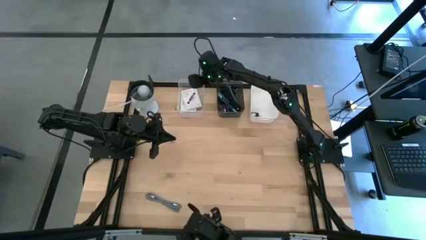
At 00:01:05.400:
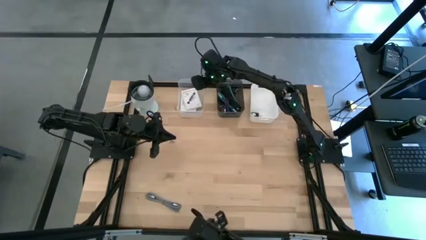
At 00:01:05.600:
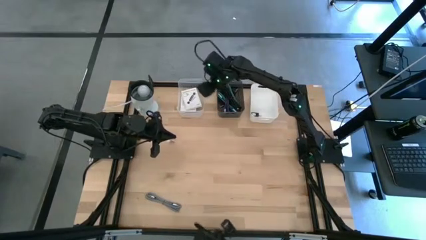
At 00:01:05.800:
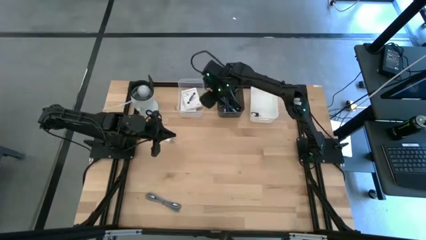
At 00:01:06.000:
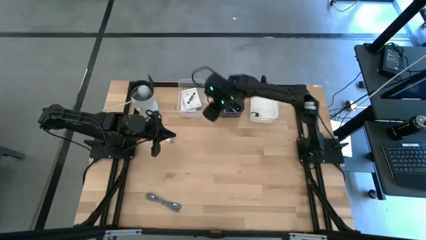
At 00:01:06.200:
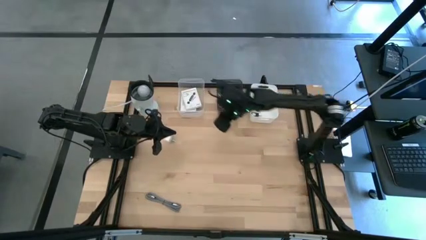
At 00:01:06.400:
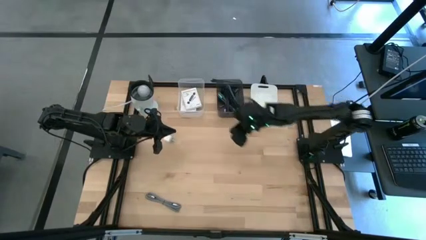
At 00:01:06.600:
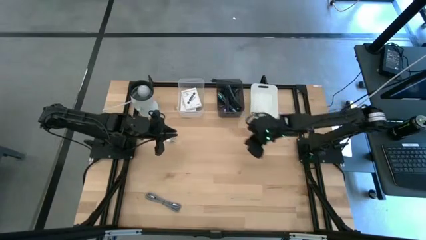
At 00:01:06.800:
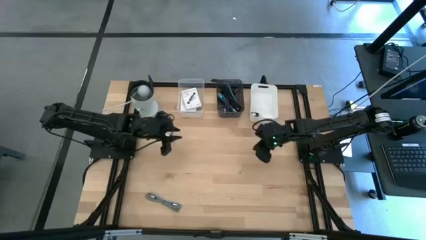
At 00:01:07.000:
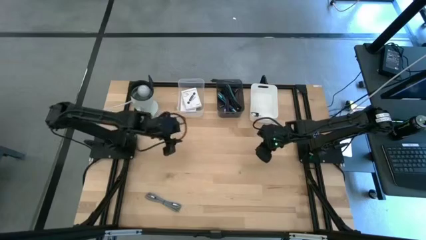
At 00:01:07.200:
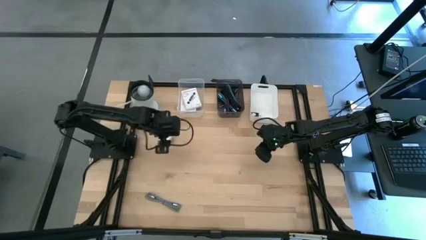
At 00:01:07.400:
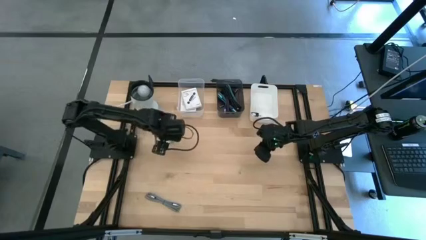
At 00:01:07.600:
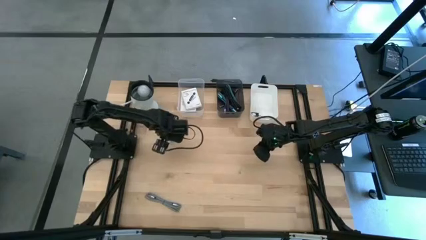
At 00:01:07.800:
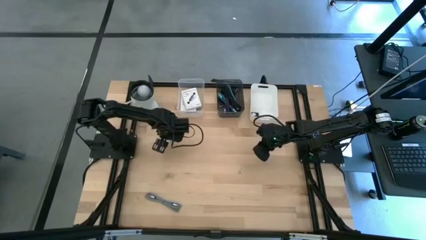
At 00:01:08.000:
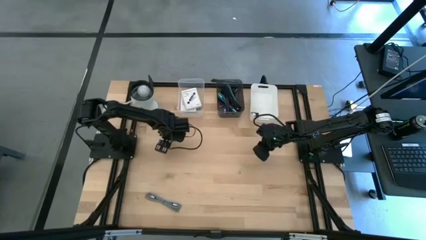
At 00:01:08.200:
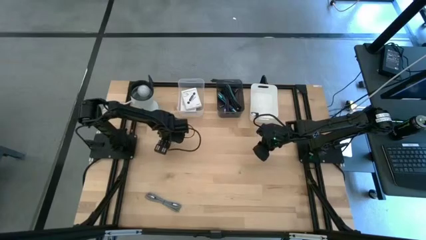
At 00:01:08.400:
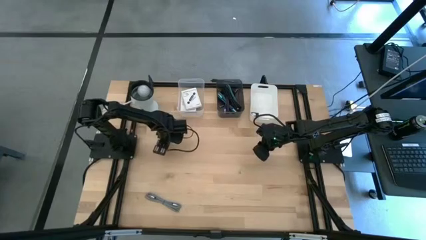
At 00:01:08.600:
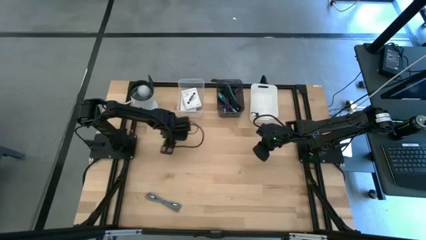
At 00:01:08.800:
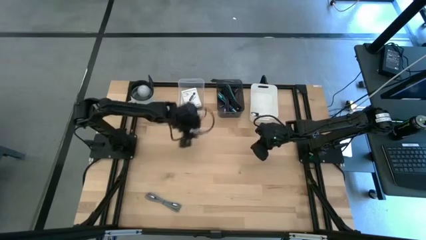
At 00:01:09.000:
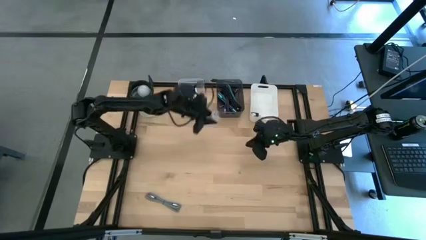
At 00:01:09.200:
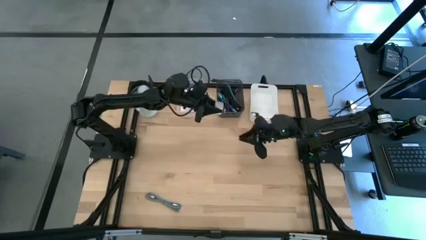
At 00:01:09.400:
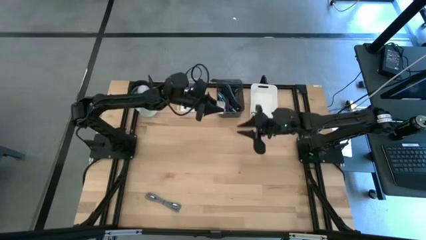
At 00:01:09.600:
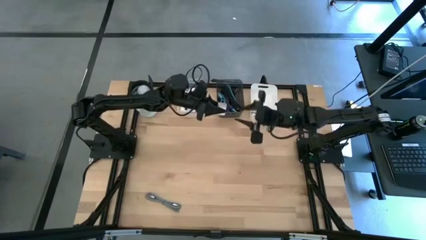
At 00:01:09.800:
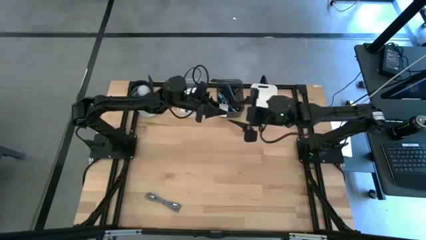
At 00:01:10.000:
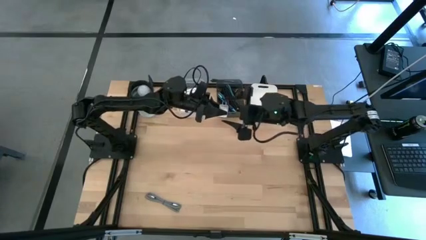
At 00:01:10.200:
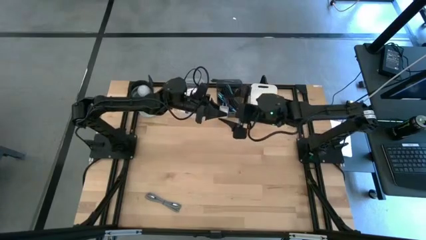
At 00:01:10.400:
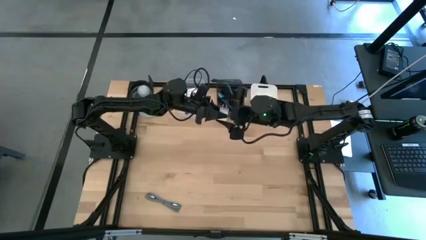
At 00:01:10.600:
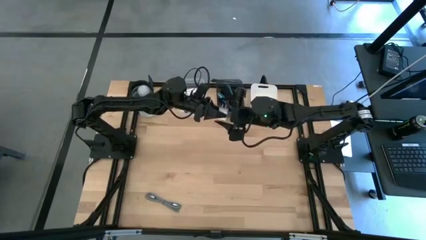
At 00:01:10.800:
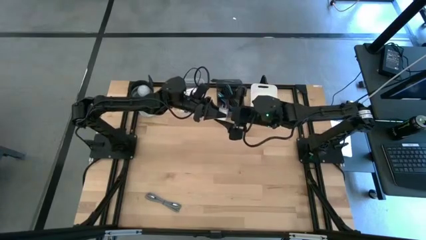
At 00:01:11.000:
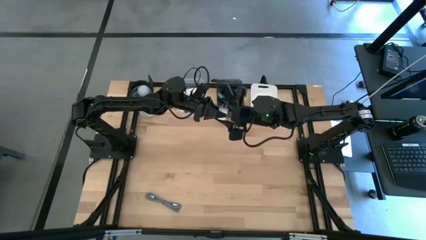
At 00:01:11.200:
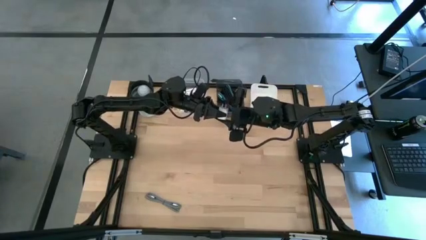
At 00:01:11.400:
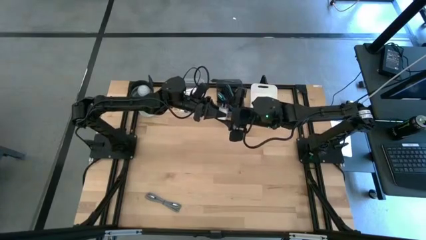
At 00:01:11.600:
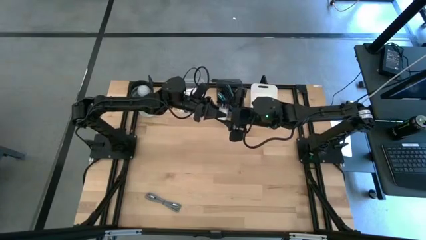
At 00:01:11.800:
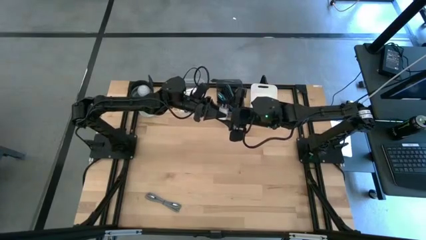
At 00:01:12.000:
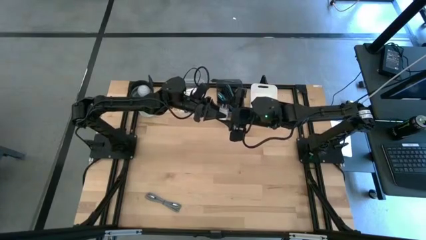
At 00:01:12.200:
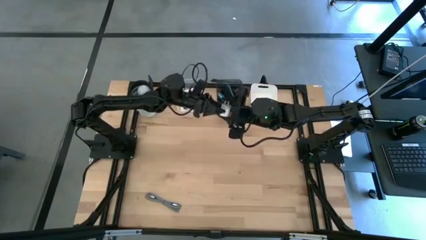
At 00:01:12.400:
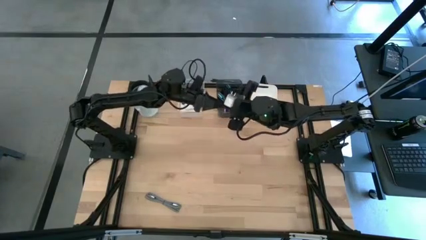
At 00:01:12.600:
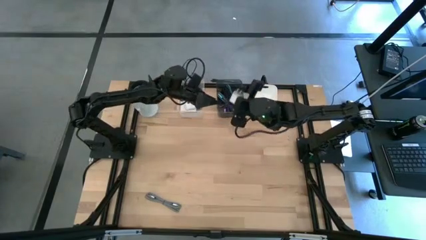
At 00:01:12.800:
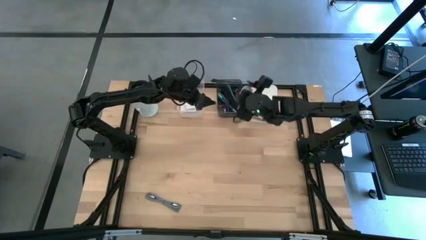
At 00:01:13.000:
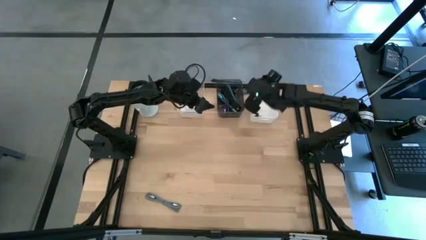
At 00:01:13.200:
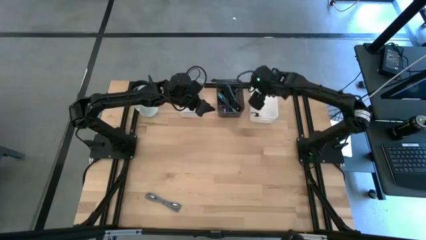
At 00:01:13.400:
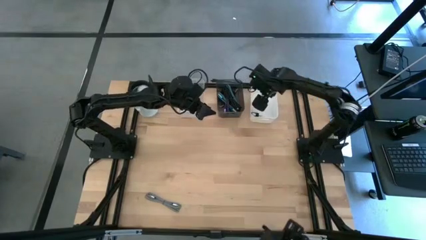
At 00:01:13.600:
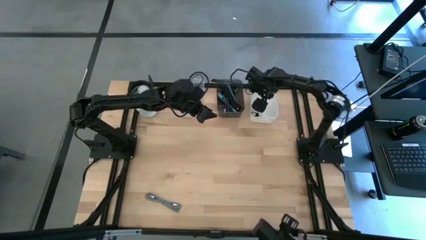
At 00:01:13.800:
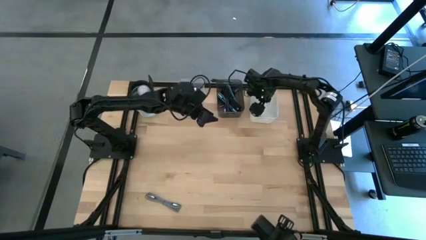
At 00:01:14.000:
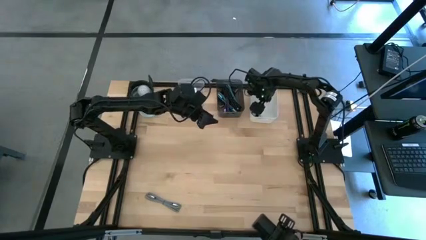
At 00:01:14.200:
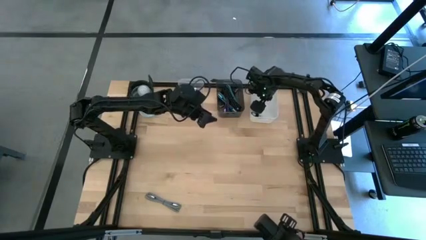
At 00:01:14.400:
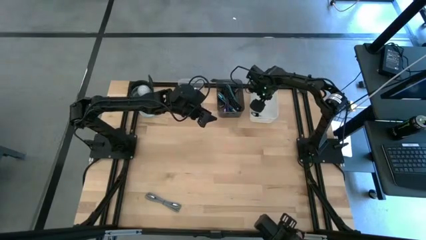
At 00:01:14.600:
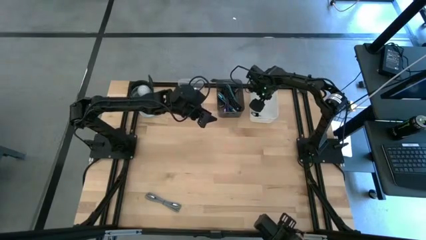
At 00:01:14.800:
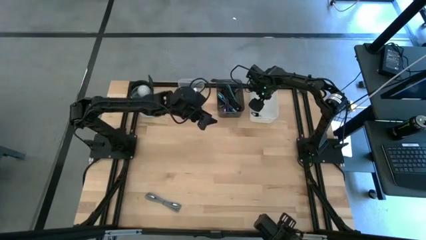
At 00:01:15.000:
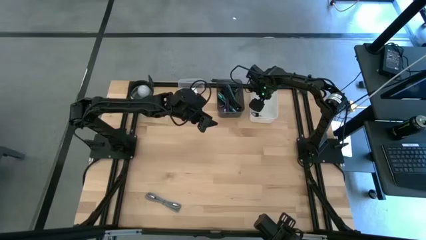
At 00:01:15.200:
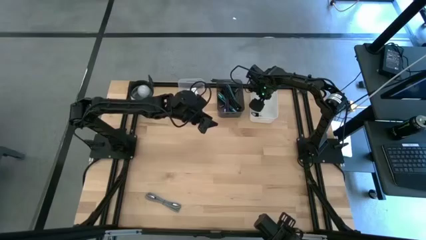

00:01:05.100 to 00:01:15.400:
Task: Pick and place items into bin
Put the white charger adapter into the white bin

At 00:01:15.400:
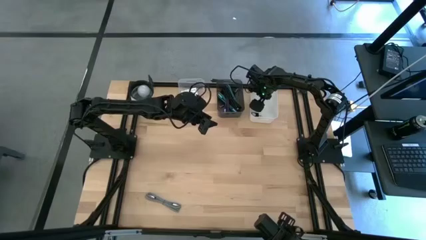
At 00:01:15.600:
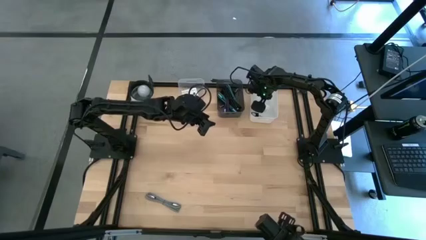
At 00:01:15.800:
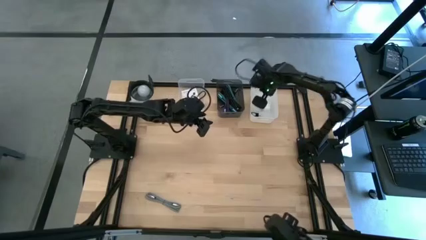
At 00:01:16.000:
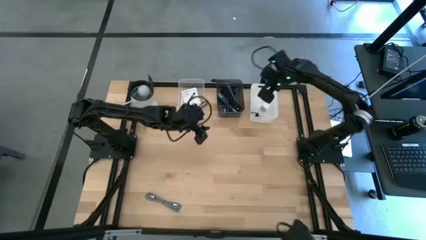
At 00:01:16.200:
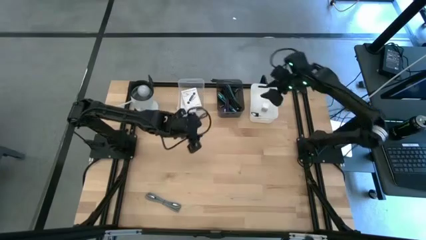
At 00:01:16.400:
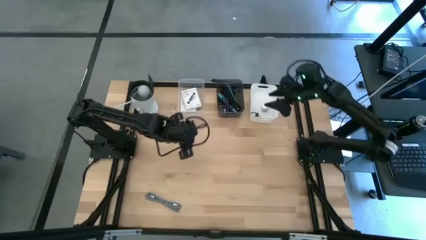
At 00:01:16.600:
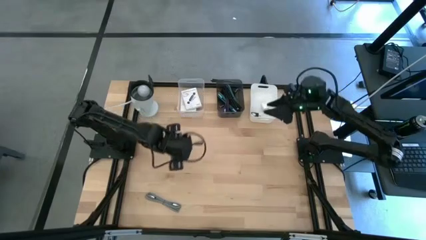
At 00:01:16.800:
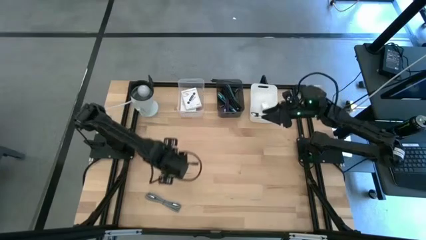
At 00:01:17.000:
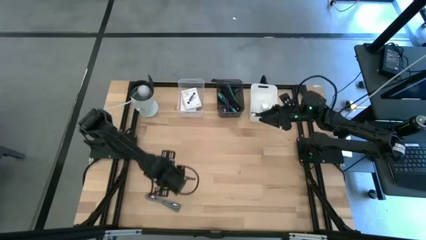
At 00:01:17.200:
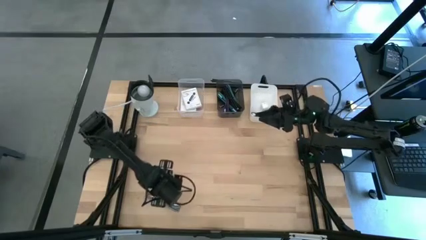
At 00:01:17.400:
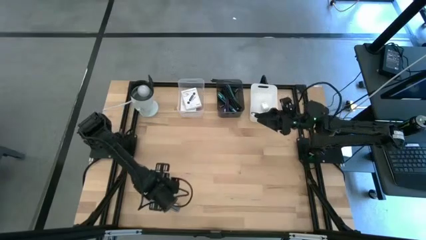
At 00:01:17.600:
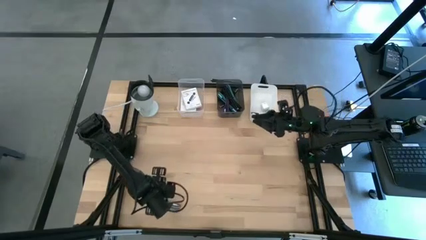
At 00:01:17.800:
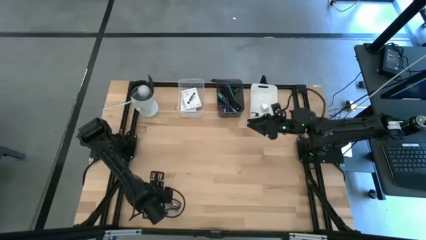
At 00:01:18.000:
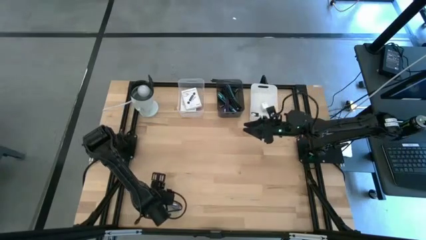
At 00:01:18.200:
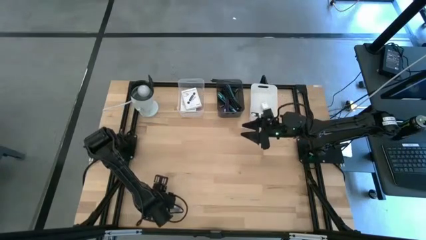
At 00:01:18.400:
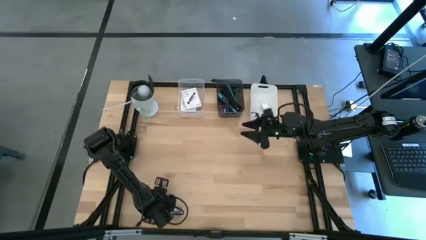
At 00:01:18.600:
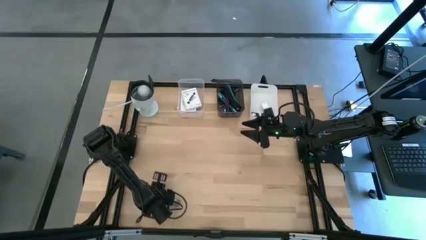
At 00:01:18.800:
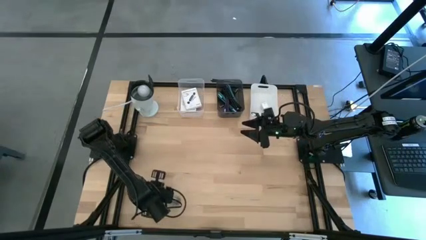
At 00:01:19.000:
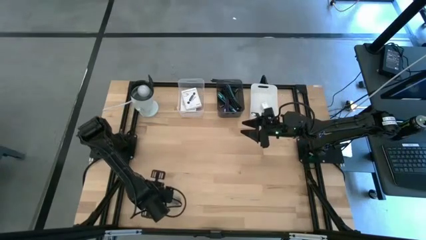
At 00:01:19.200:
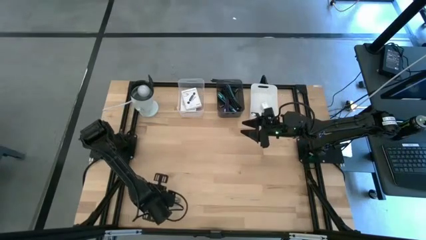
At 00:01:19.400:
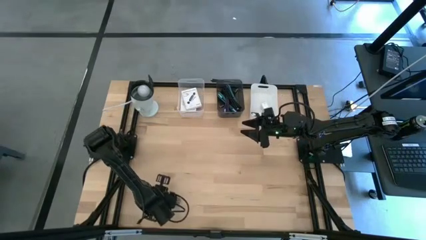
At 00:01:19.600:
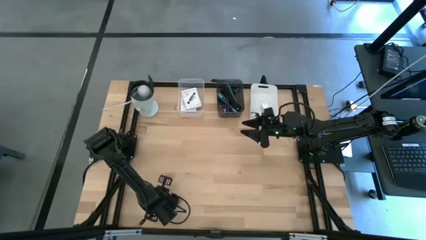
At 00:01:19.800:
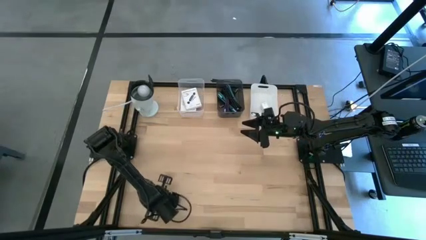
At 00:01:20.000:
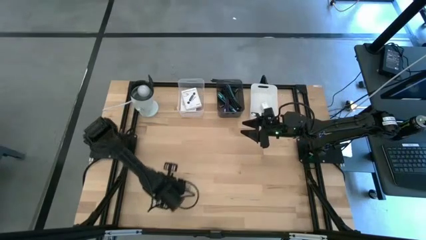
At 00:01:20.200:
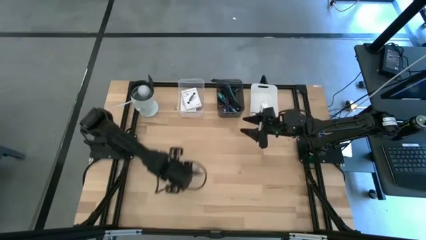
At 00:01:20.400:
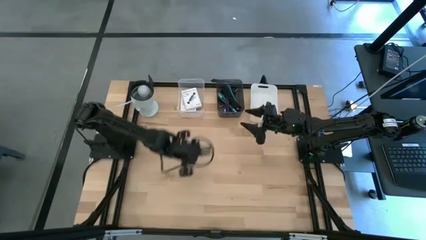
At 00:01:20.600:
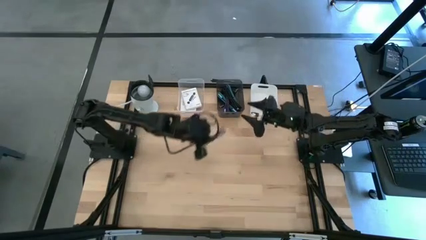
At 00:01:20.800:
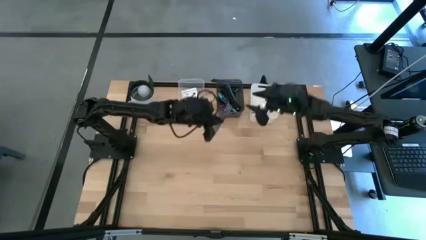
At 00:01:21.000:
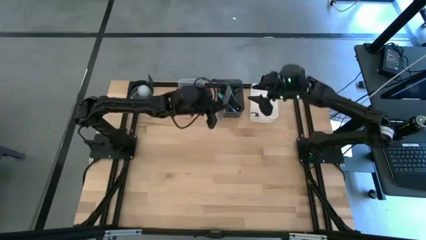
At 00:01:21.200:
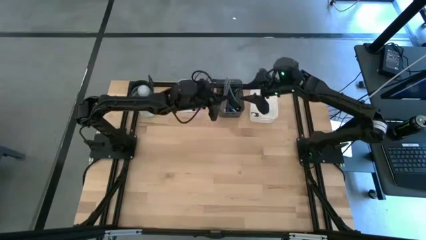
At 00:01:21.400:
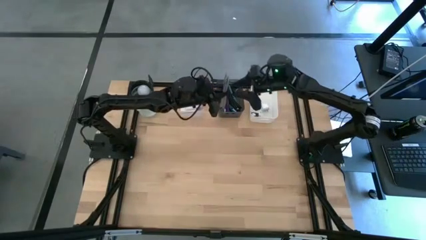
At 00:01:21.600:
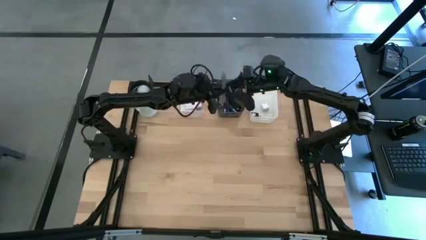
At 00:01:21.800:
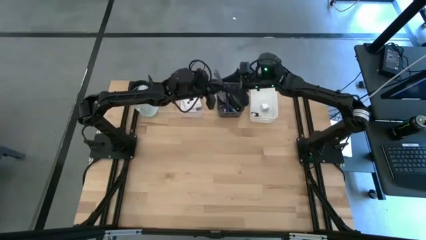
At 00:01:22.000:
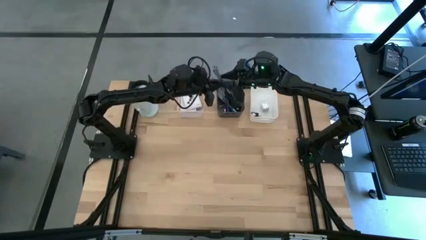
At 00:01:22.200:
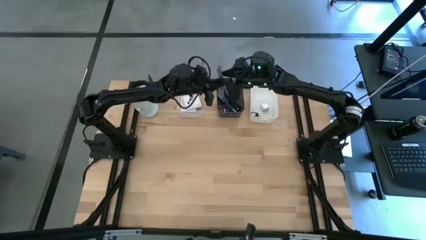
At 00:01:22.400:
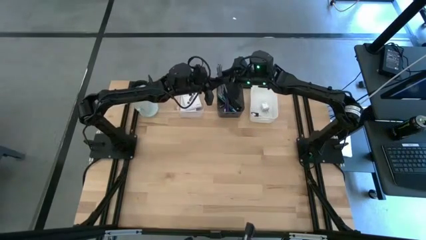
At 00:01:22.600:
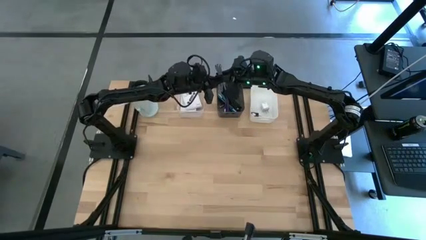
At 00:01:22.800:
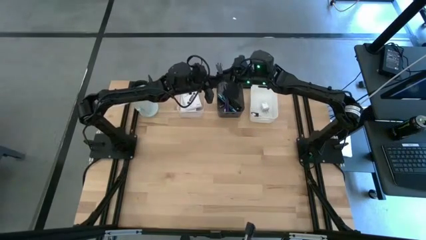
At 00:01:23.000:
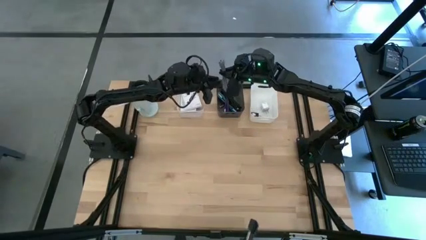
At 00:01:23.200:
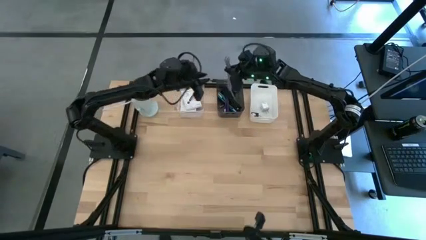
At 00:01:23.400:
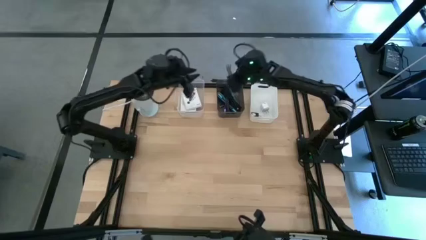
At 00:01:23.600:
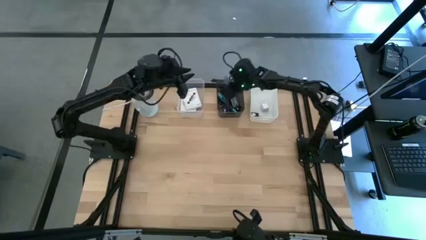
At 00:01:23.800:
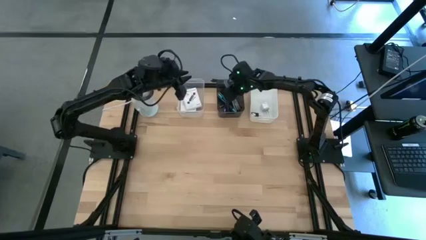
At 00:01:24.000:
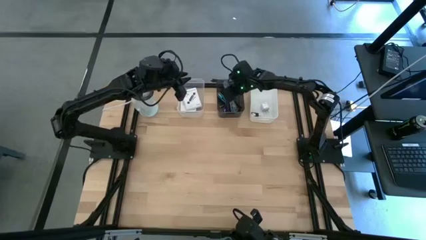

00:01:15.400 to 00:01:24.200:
Put the white charger cable into the black bin
